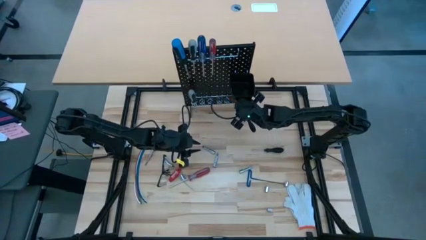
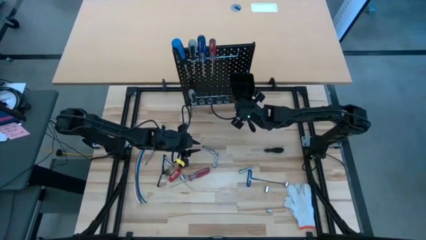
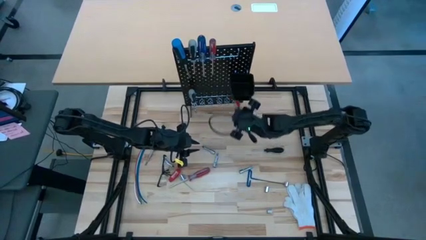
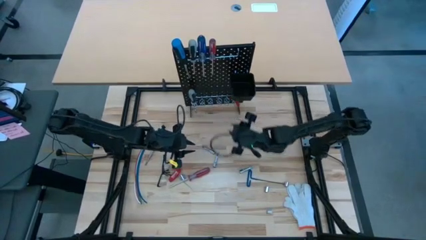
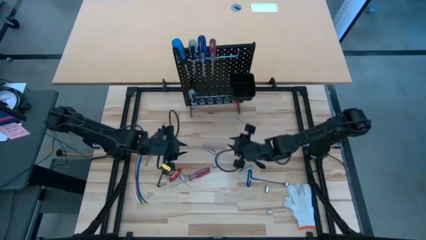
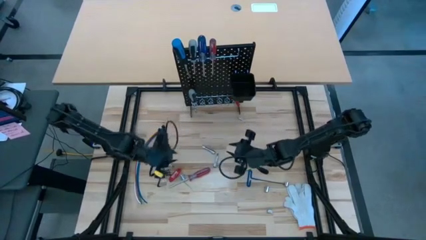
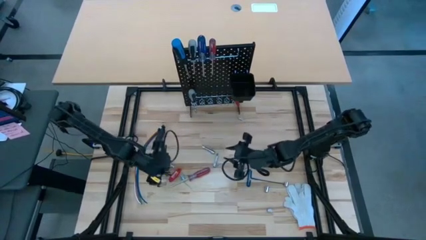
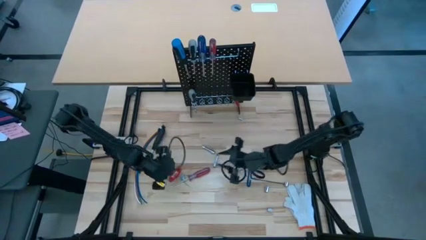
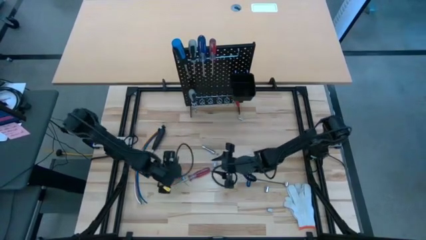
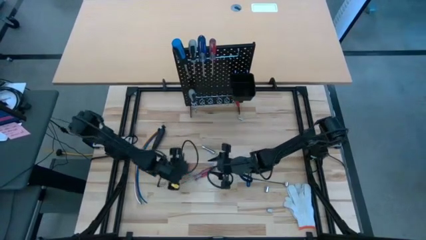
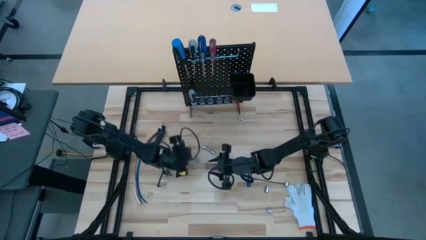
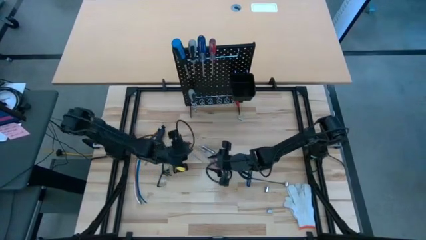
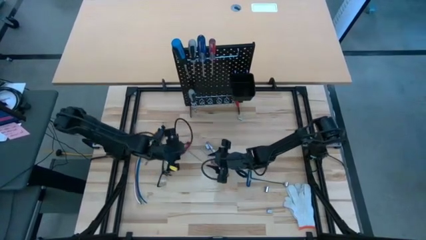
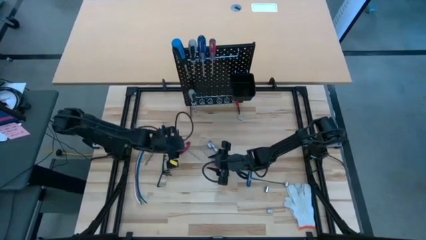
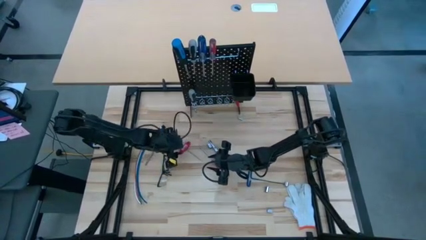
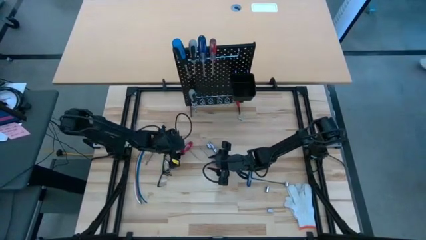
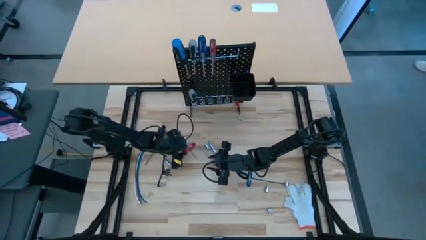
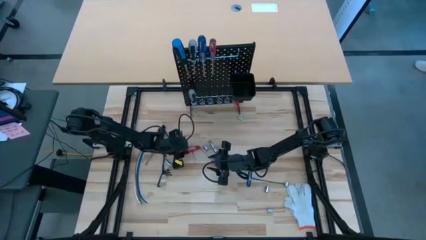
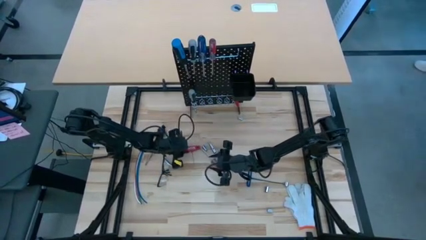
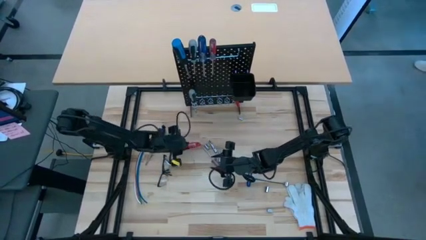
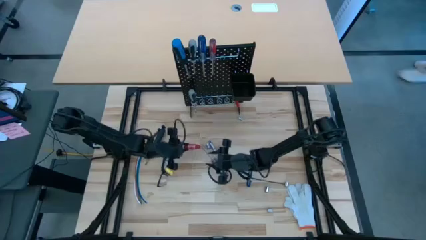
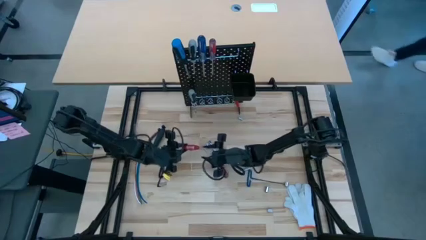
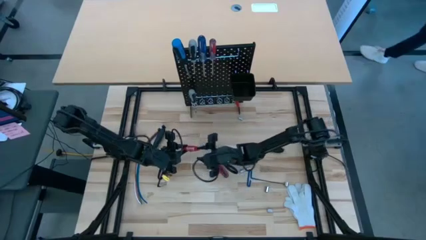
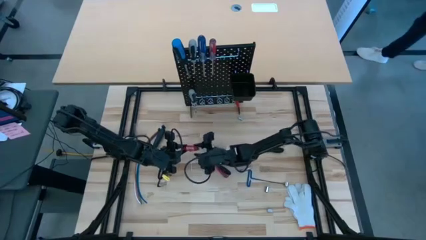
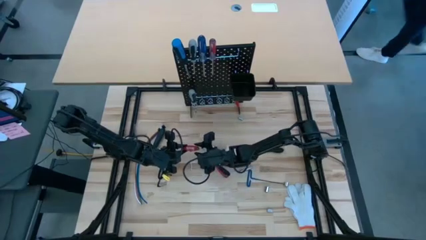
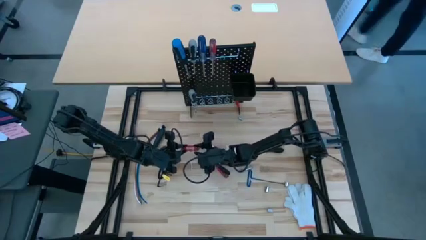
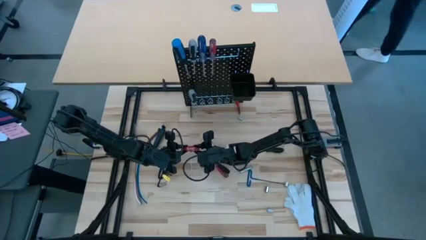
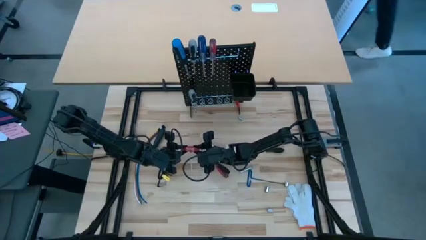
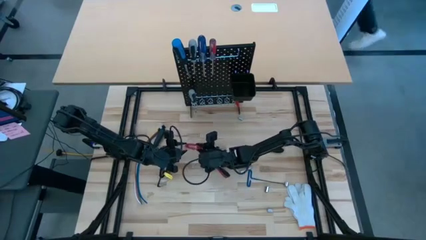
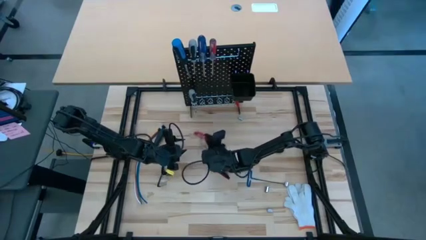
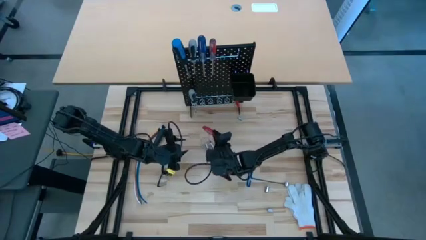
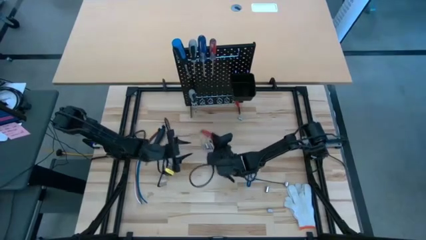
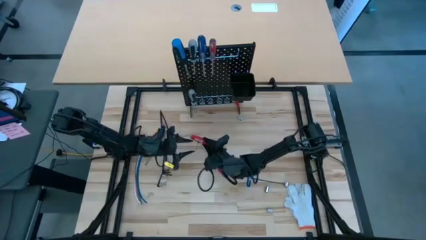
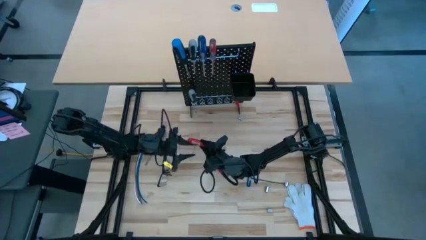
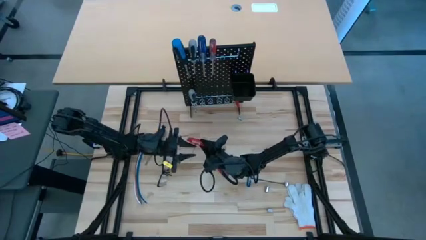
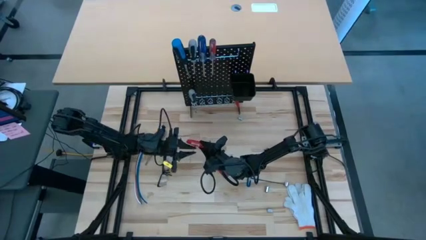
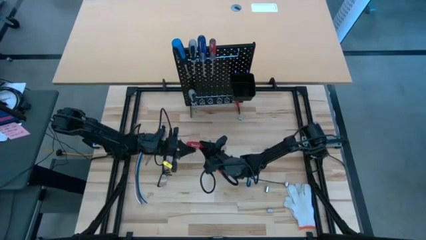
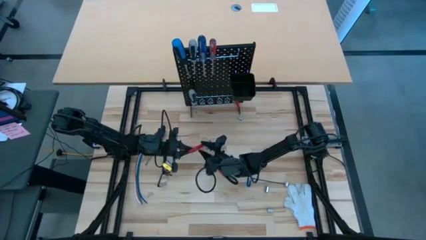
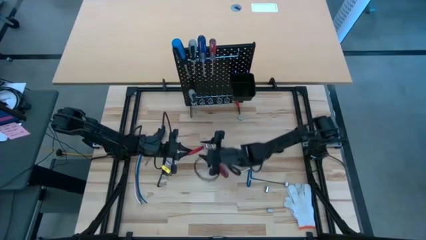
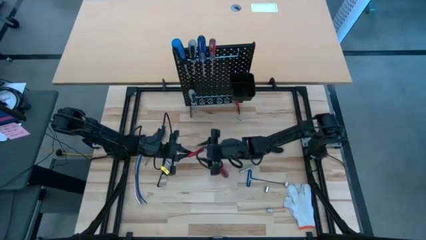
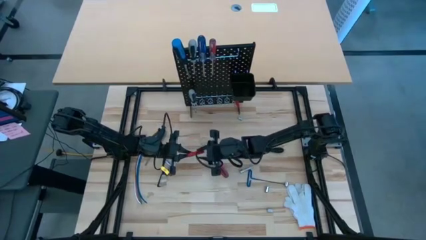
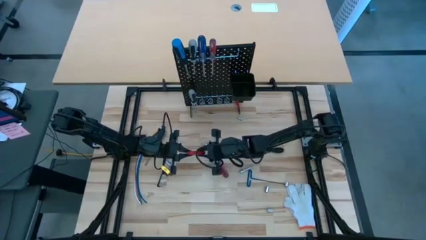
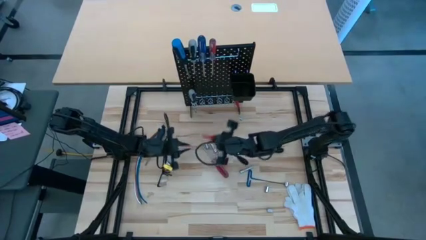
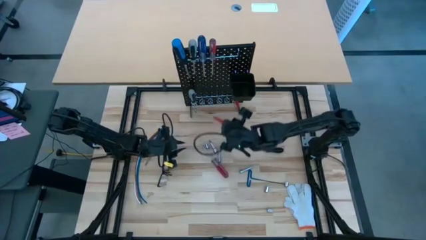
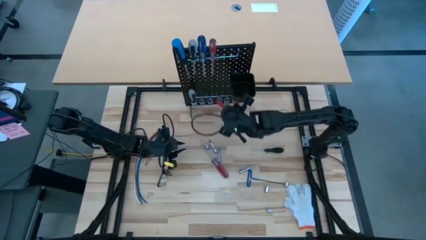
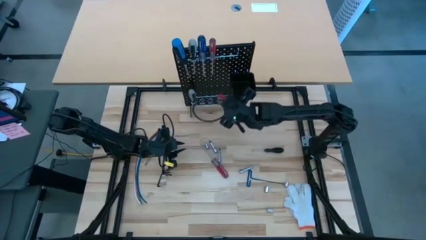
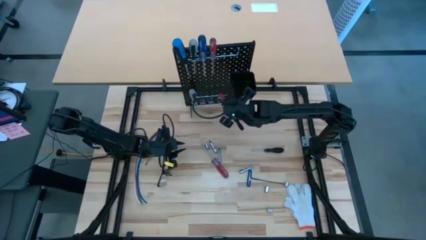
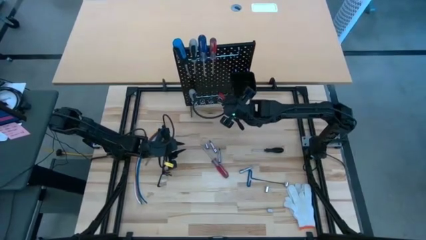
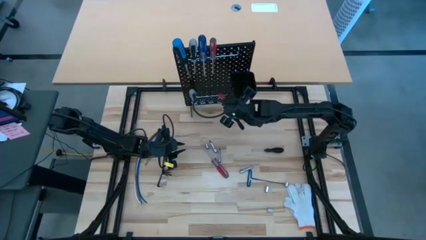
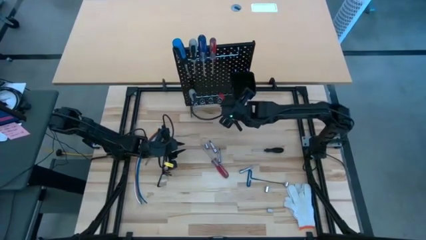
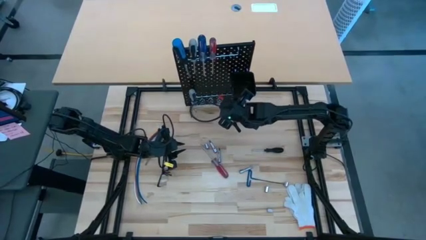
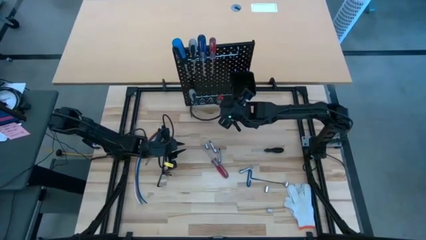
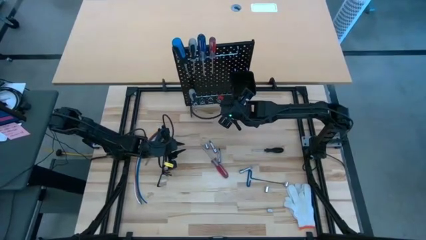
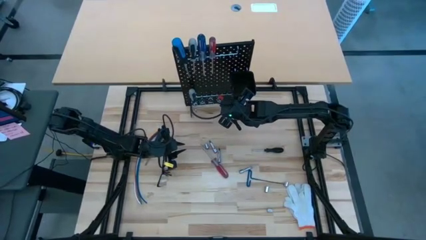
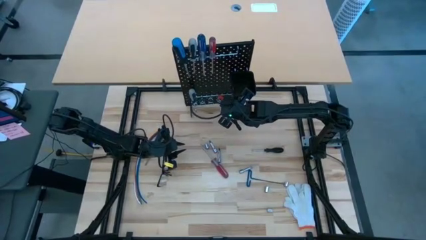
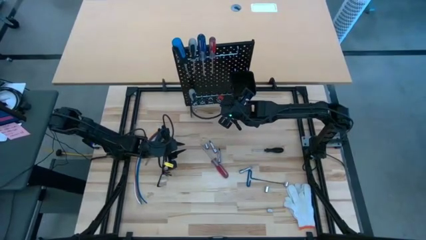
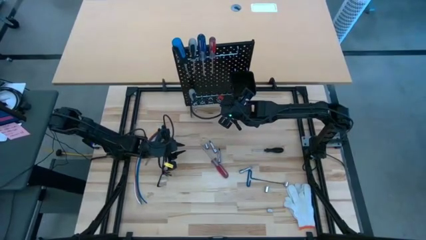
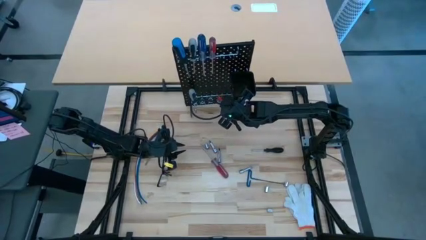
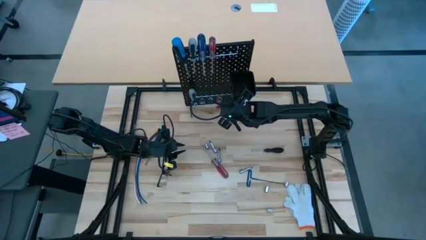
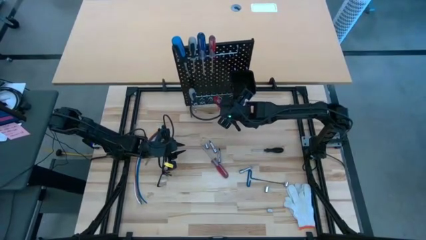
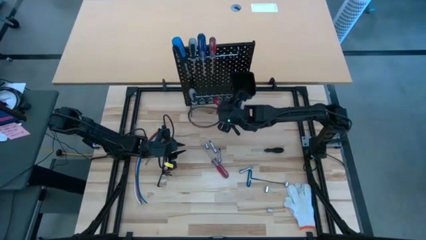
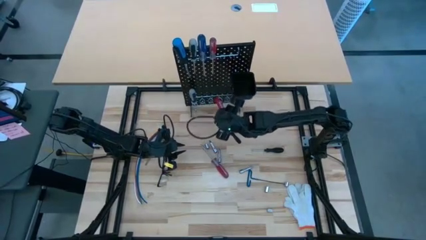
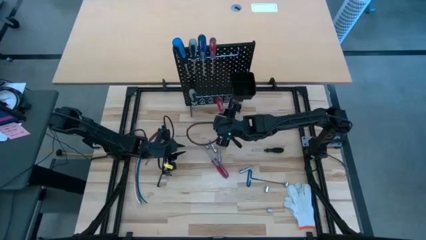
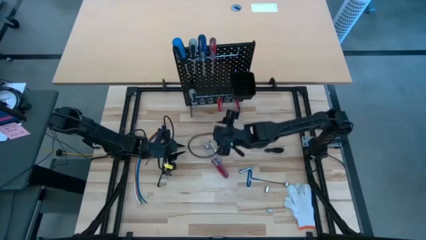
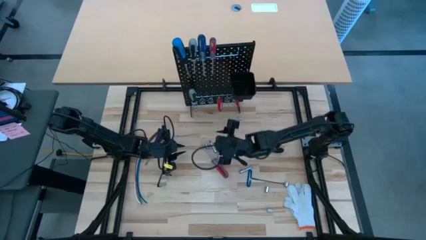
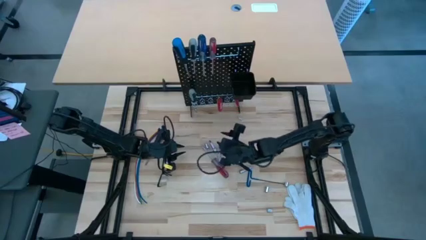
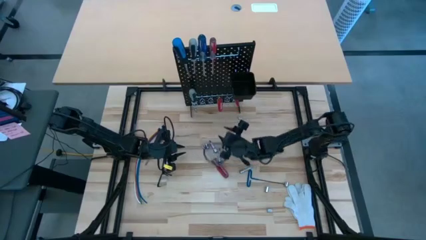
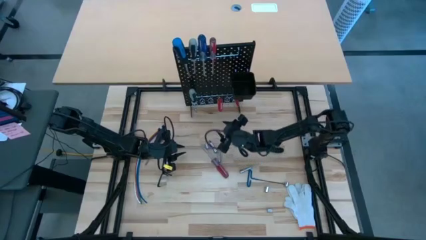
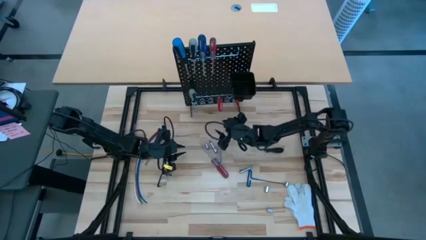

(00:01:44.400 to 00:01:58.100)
Task: Hang tools onto peg board
Hang the allen wrench on the pegboard
